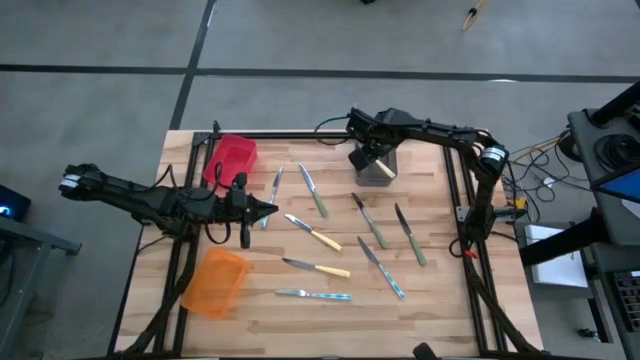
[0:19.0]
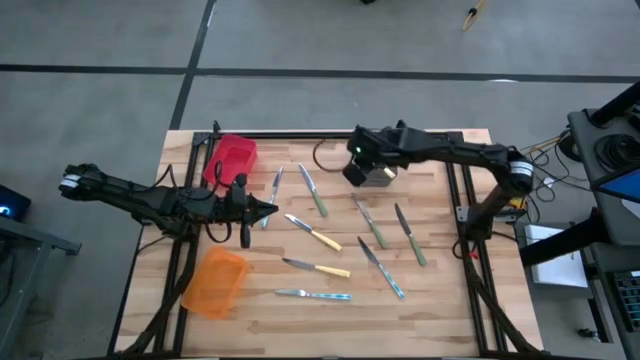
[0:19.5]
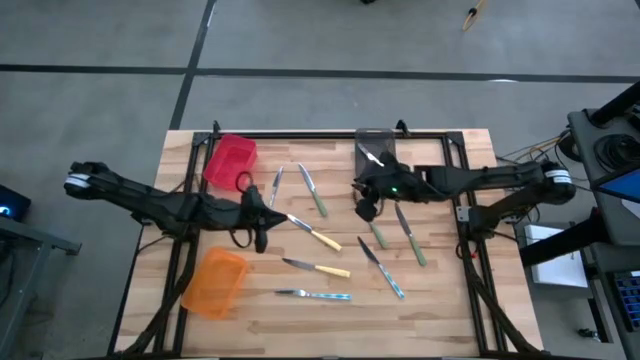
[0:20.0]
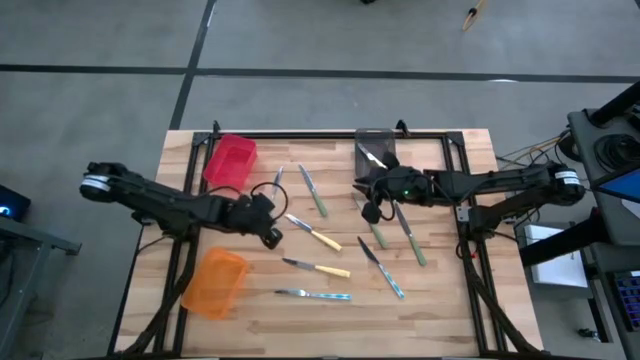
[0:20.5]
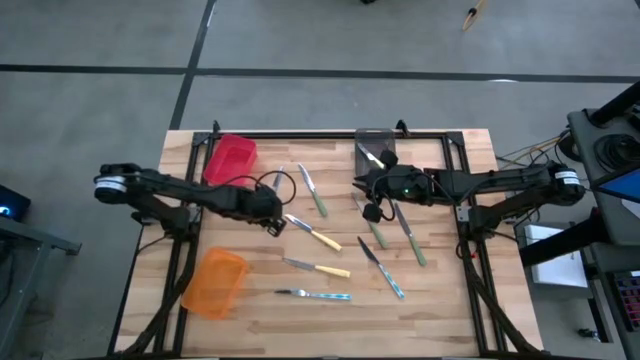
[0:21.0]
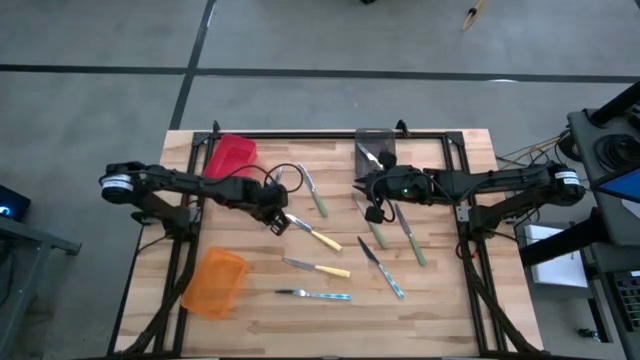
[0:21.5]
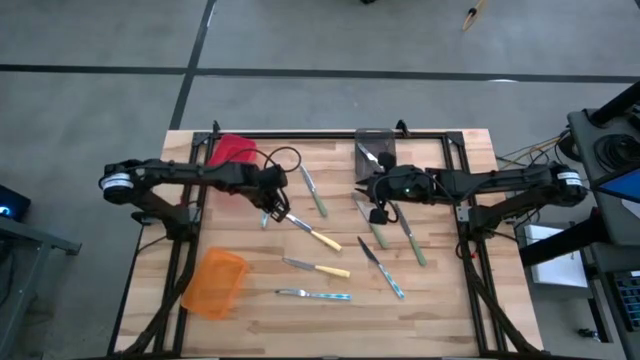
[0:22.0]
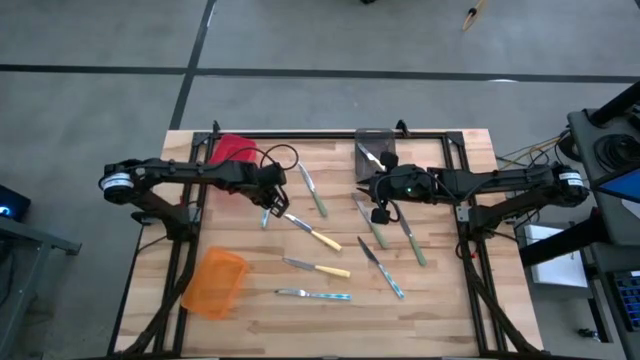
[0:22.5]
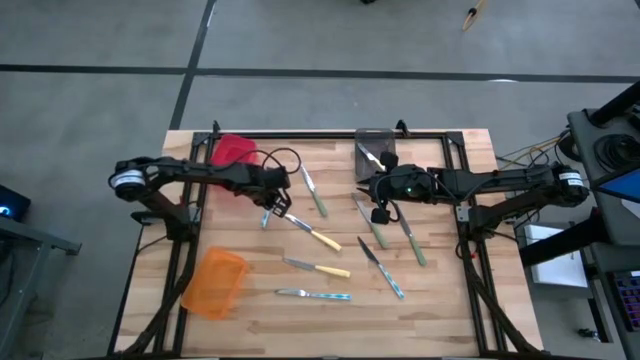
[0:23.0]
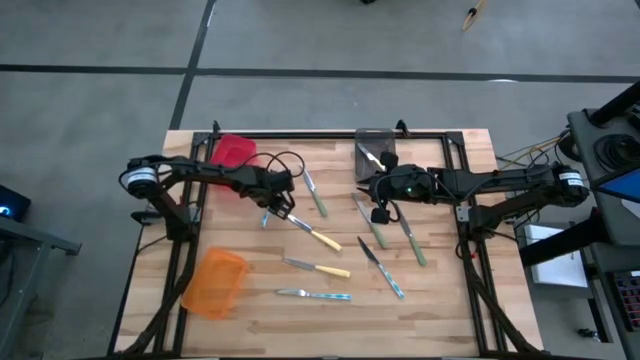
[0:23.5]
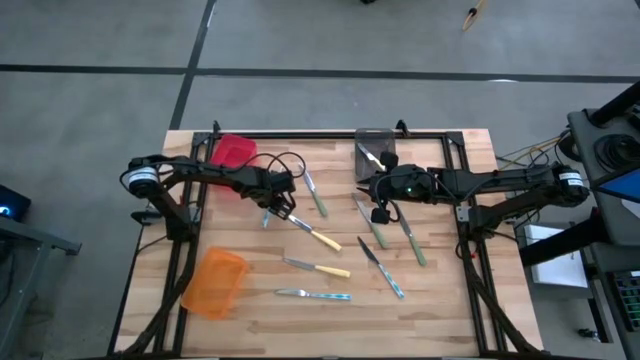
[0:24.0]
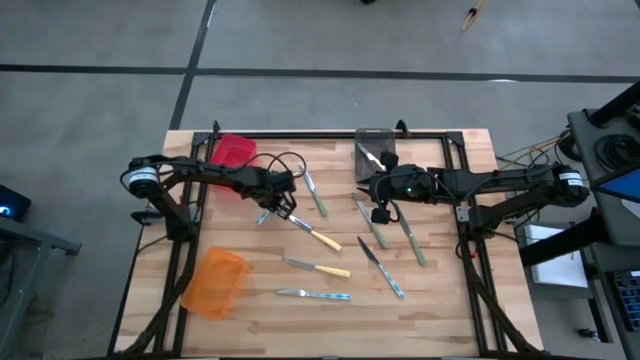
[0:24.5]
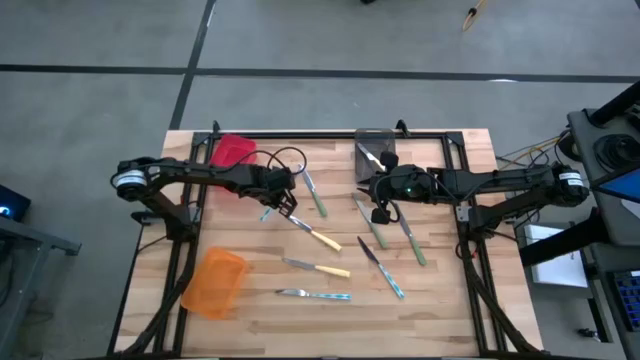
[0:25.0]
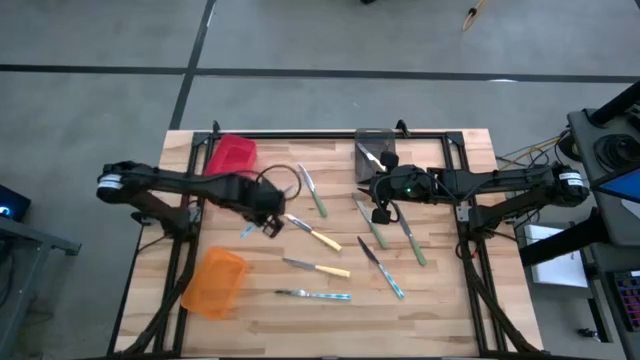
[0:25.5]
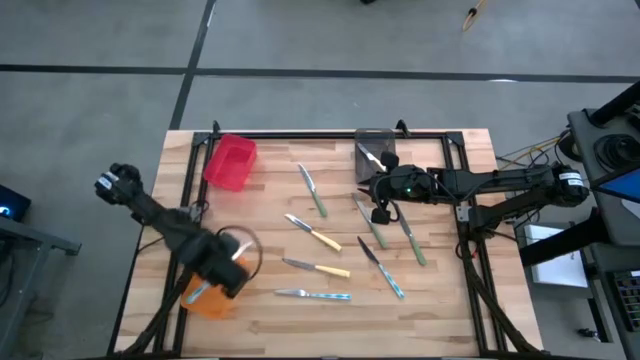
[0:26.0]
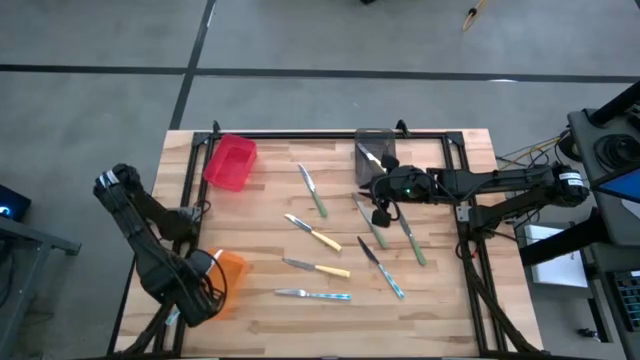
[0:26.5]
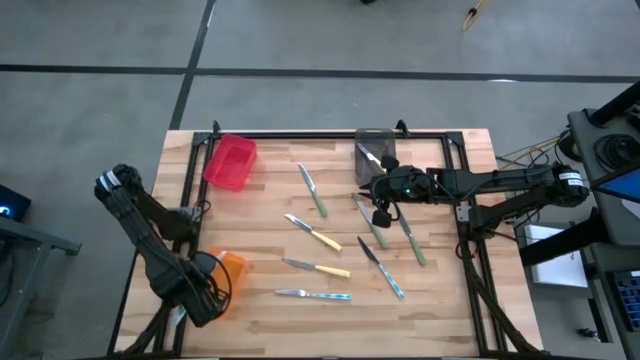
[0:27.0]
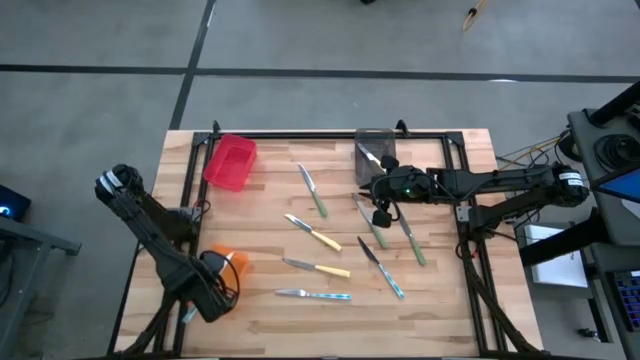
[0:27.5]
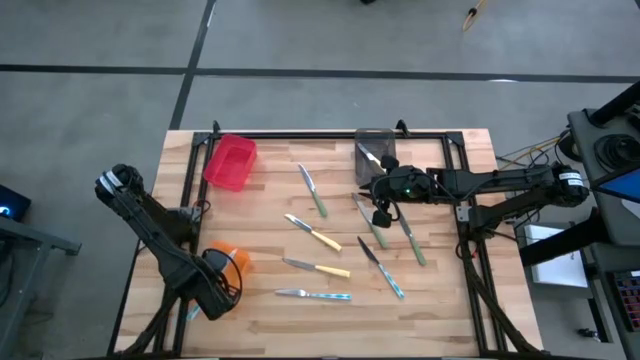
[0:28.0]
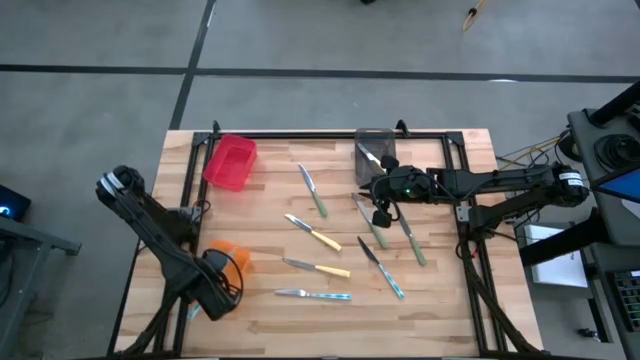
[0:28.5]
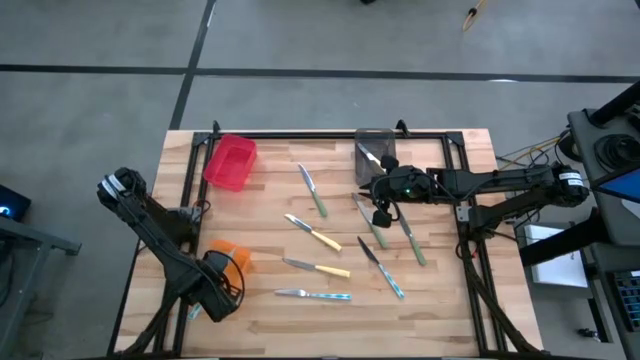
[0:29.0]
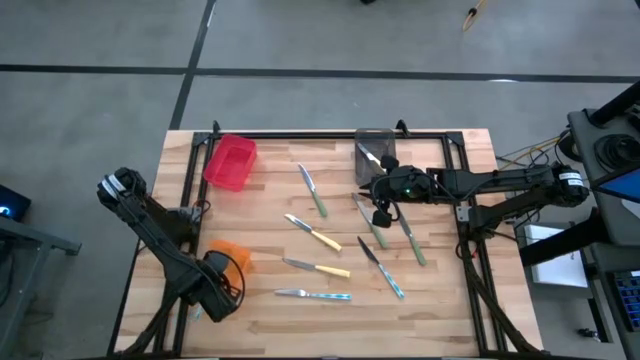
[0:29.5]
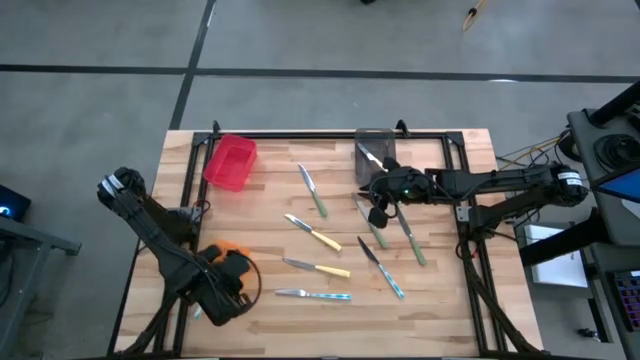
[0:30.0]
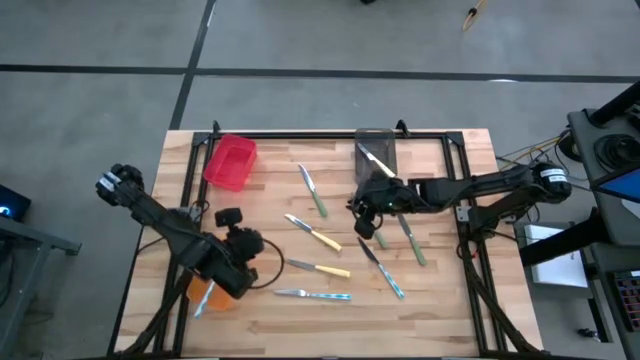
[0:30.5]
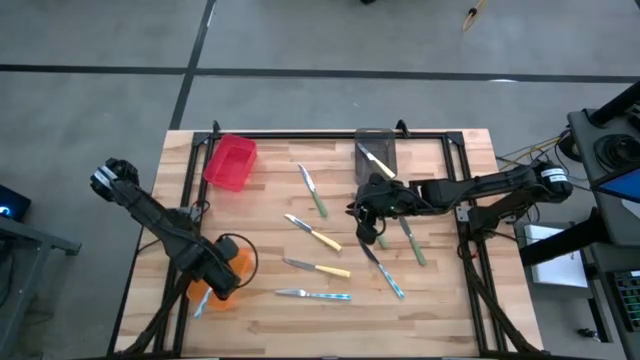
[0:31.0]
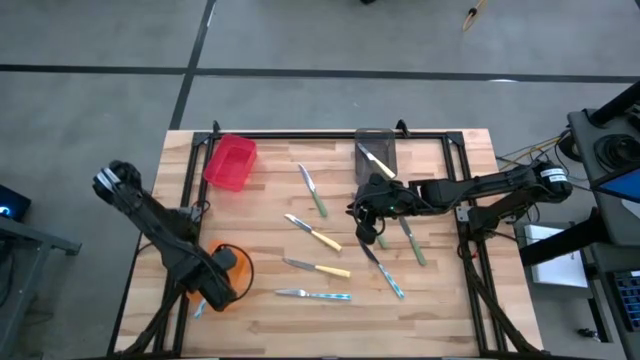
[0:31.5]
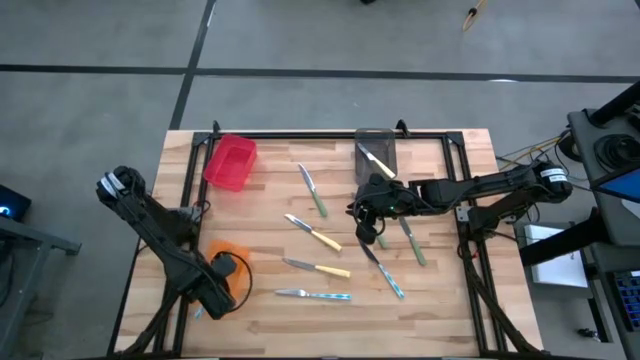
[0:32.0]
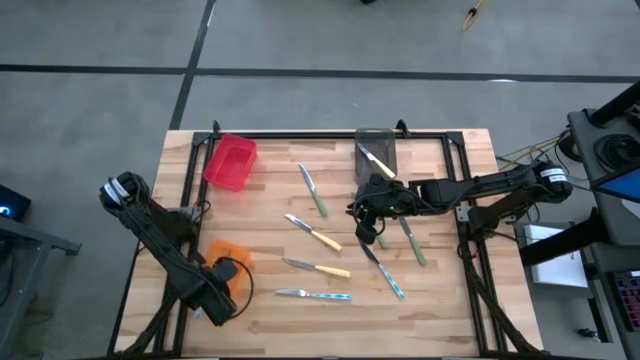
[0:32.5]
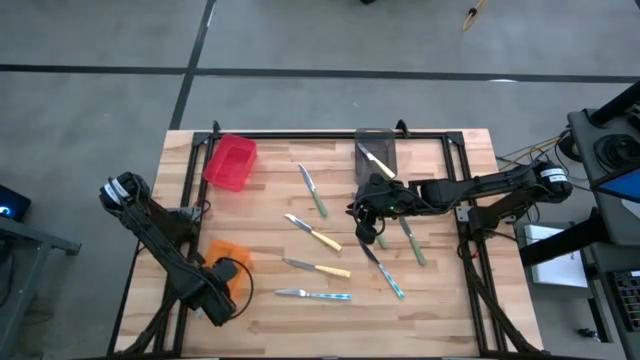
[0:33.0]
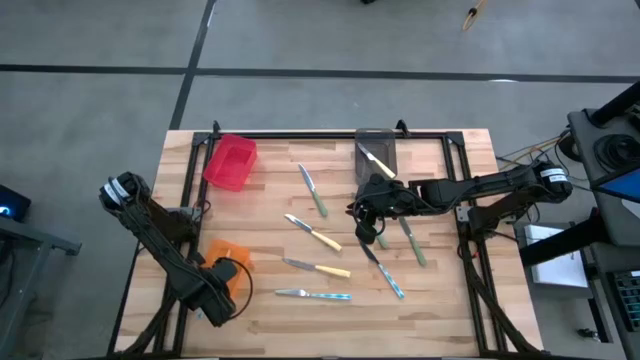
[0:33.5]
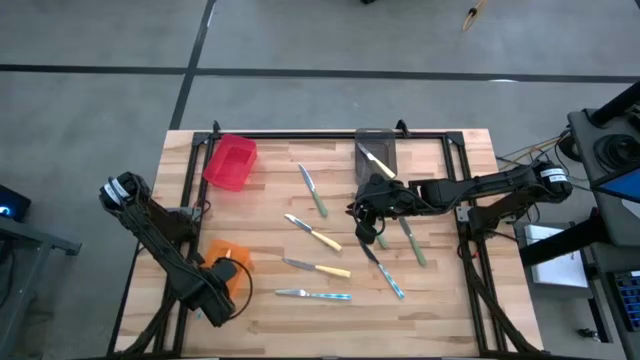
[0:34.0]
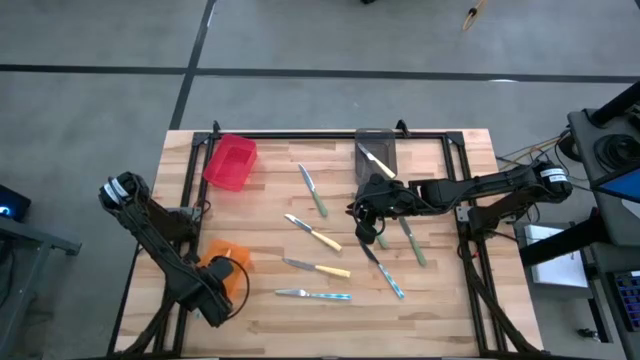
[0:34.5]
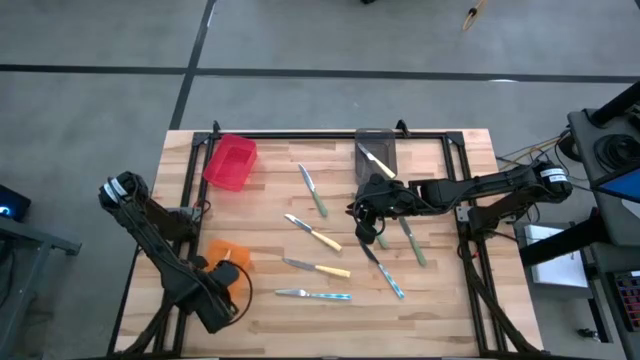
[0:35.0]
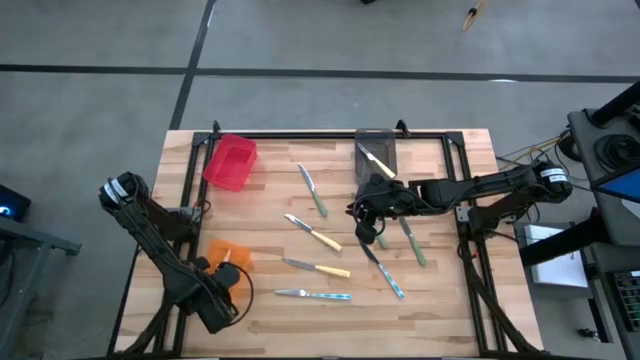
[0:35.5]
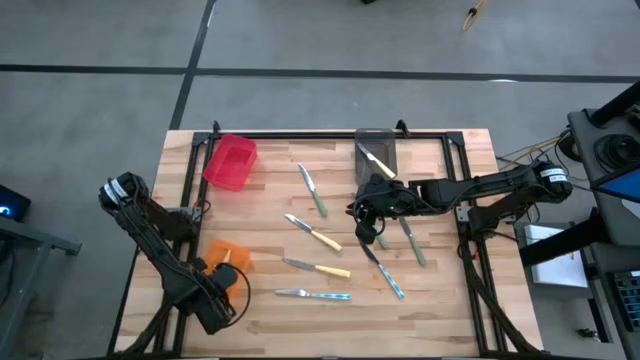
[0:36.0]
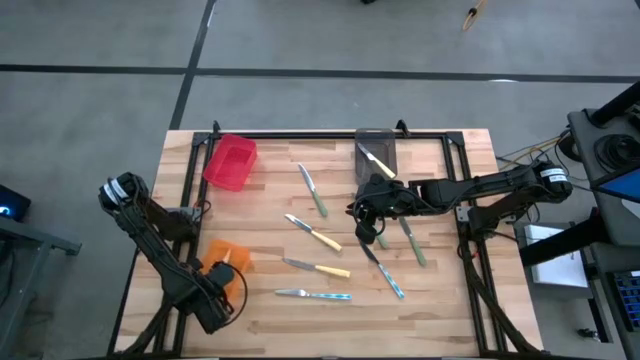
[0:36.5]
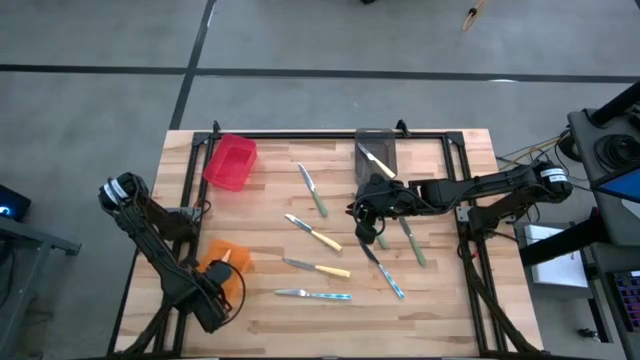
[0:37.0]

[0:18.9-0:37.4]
Task: Sort silverware by color (type)
Put the top left blue knife into the orange bin

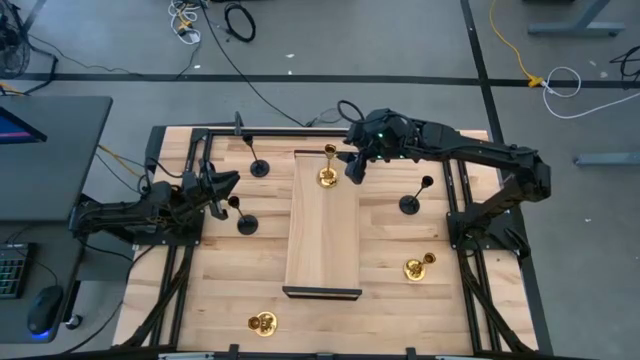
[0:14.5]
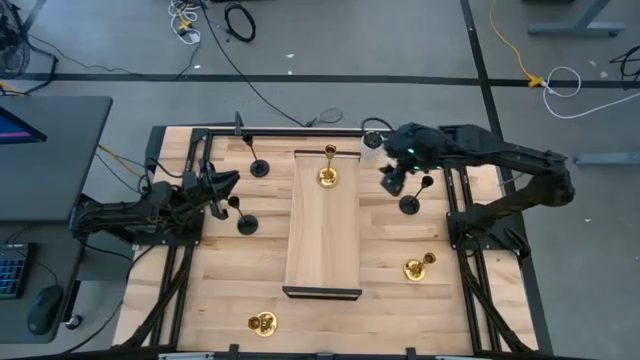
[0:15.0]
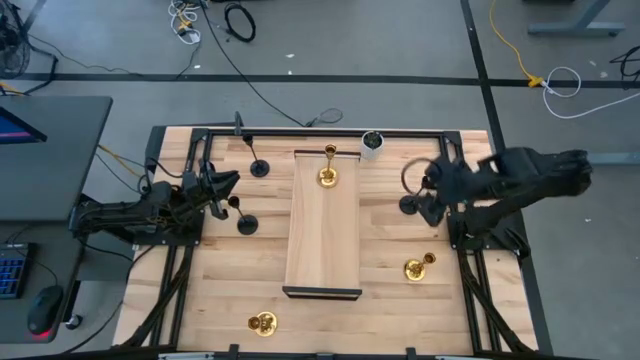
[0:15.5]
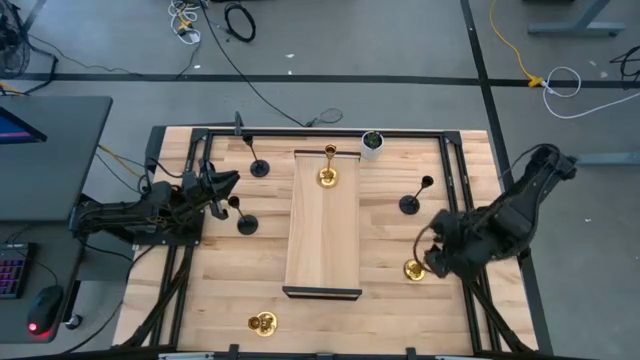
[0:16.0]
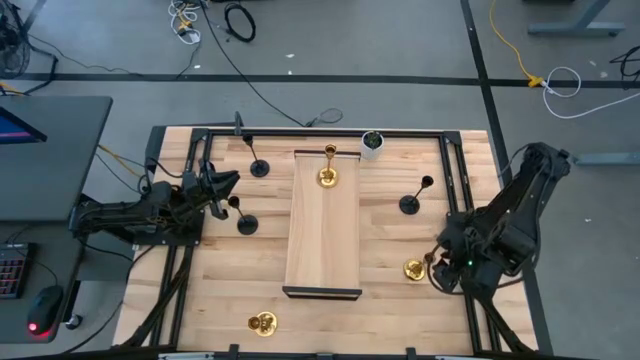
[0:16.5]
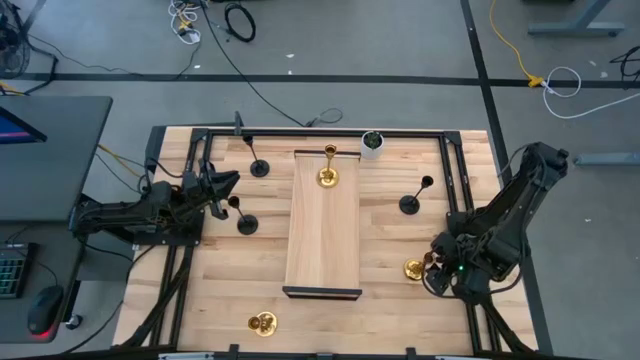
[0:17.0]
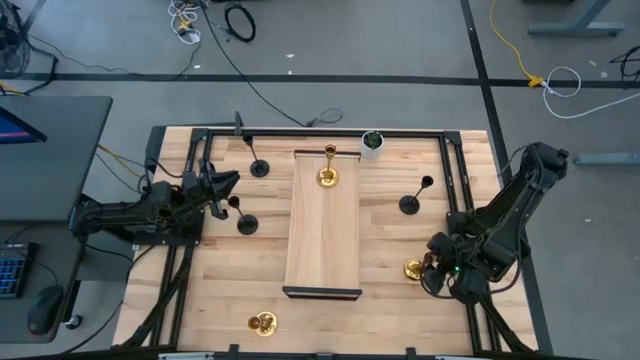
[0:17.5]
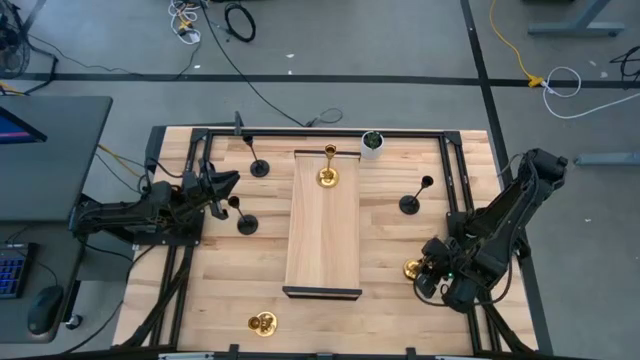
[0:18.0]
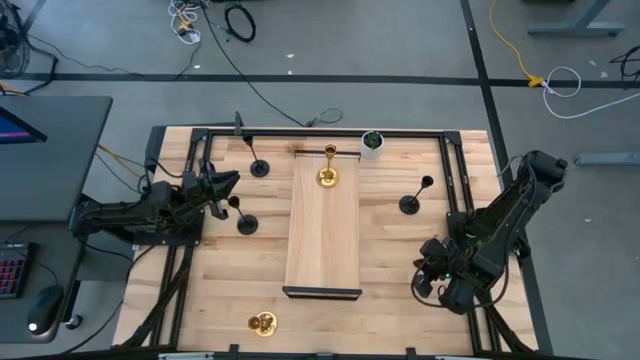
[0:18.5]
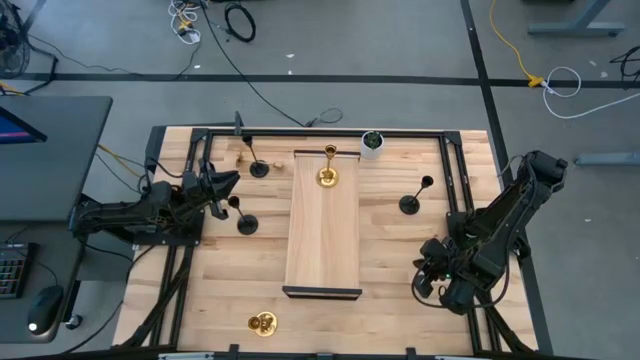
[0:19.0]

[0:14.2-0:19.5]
Task: Pick & Place candle stick holders
Put the right golden candle holder on the shelf
